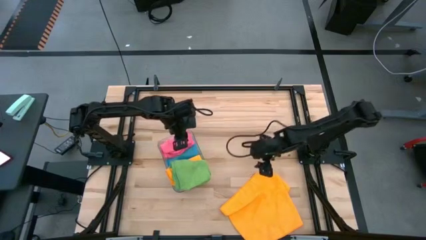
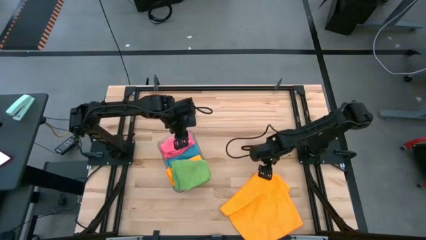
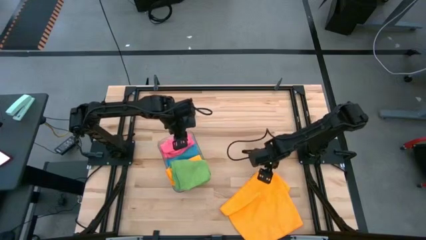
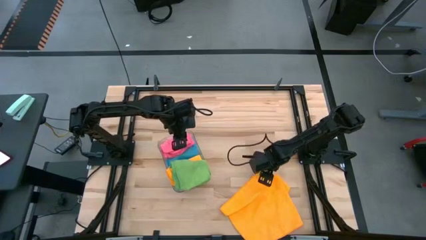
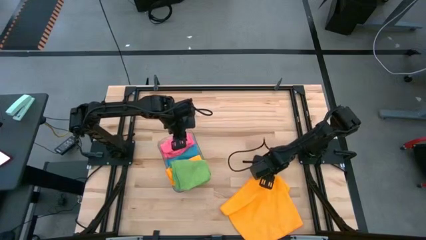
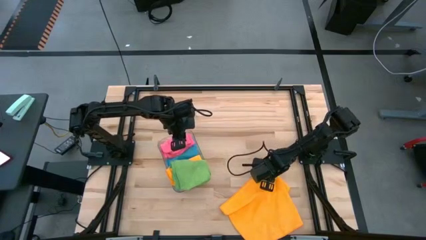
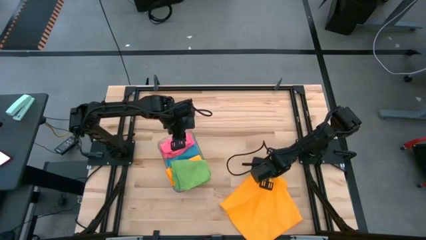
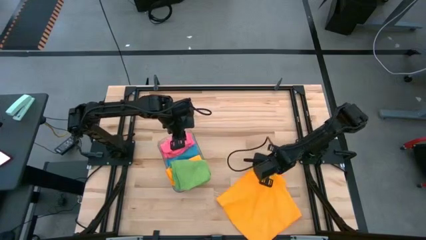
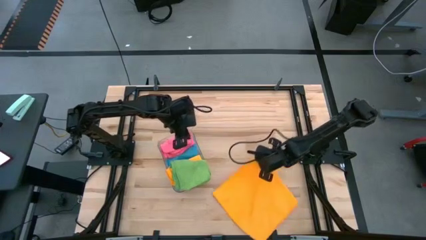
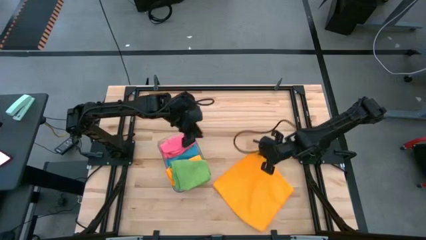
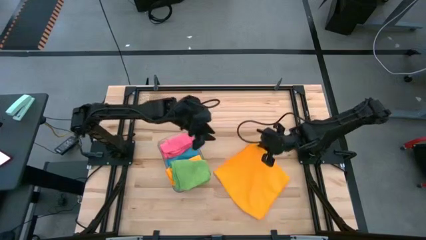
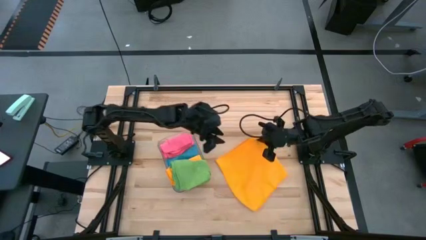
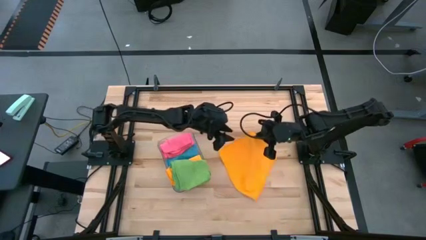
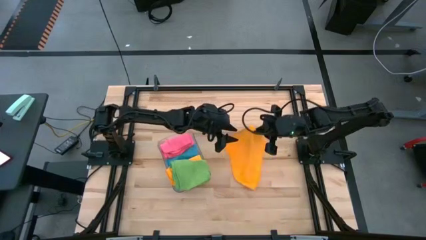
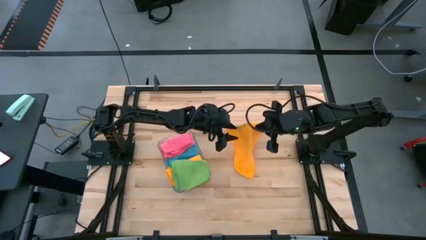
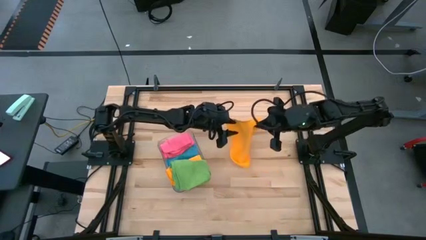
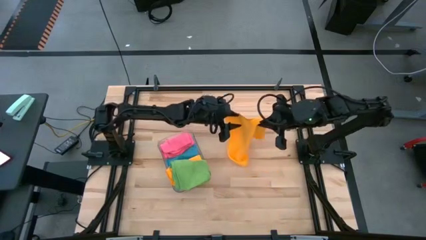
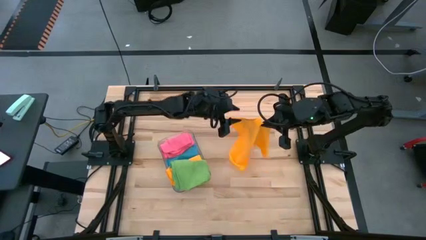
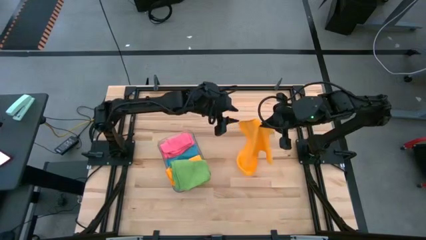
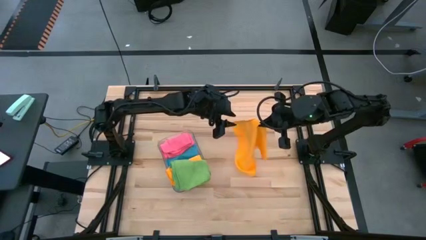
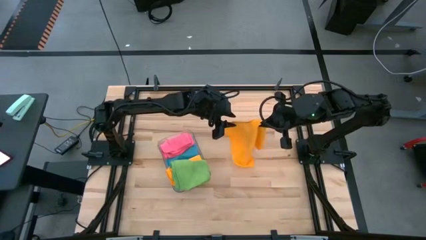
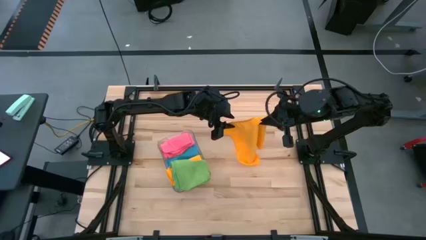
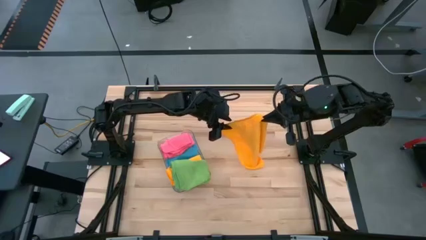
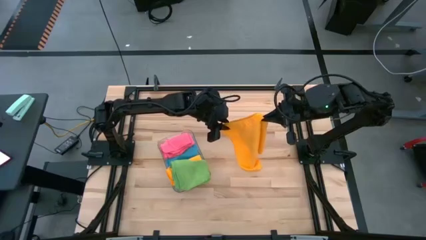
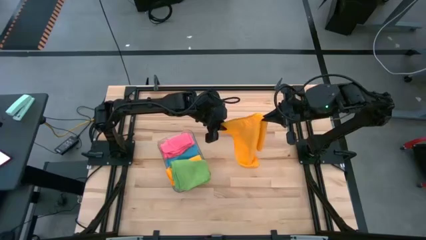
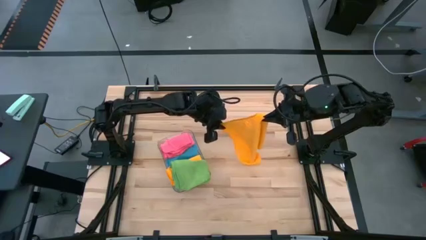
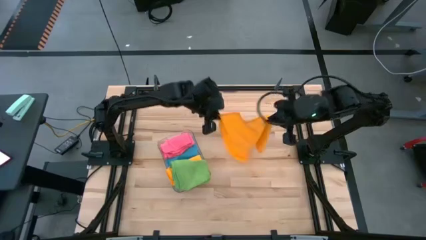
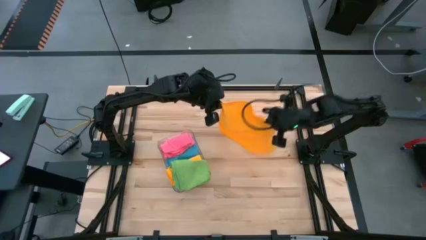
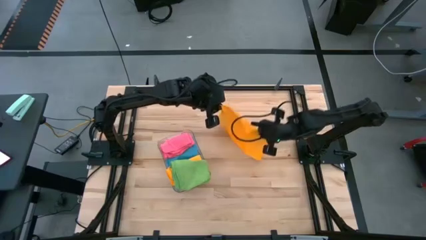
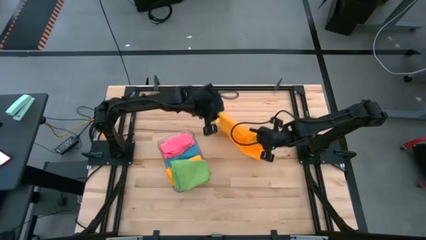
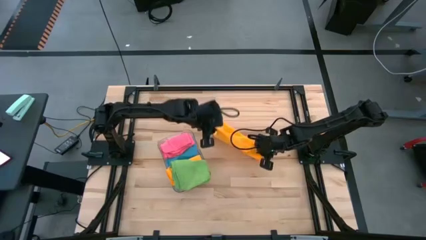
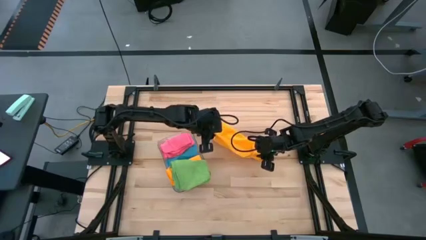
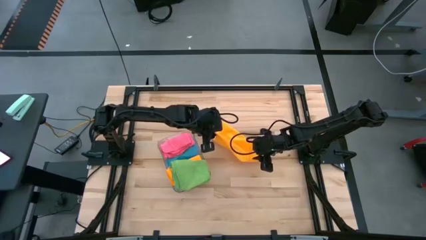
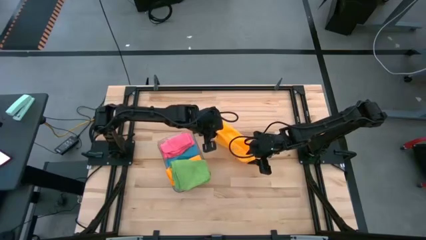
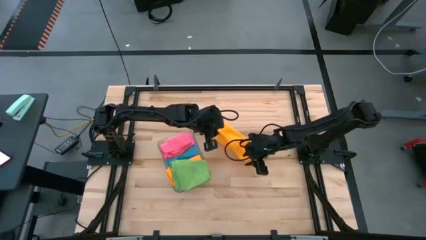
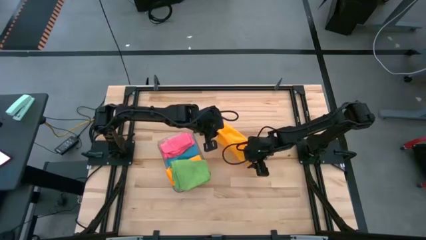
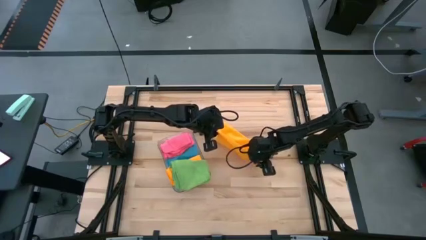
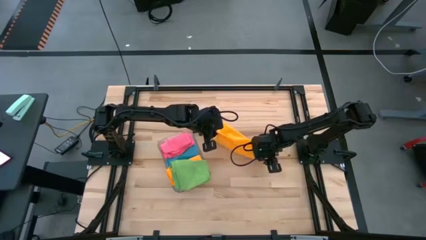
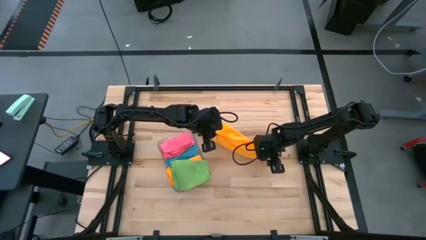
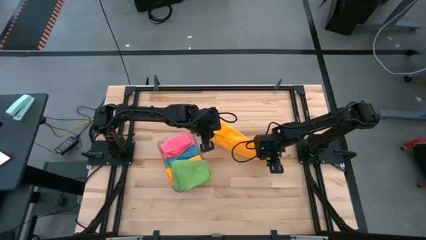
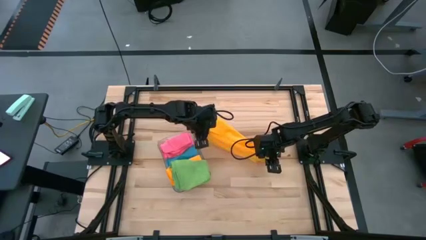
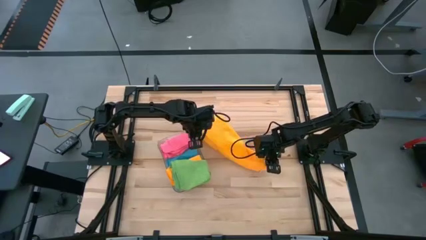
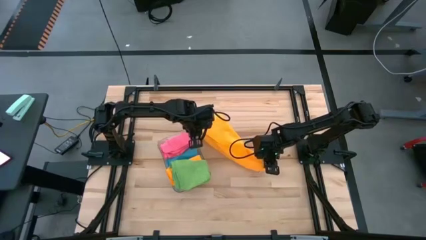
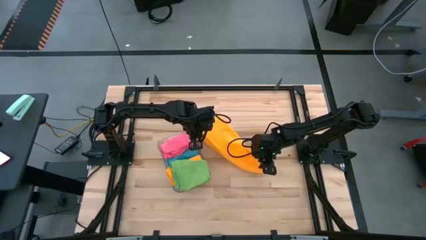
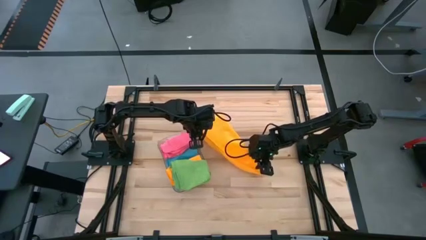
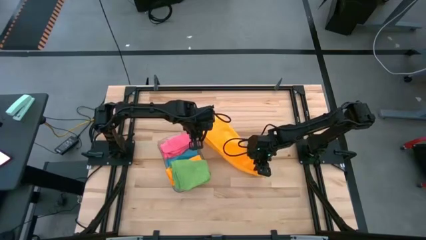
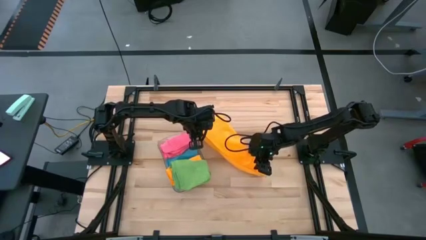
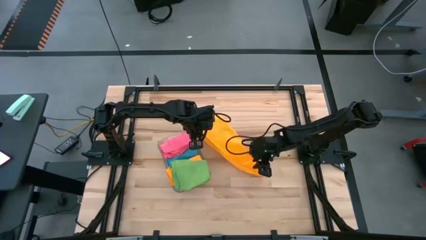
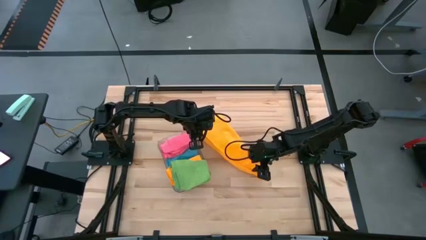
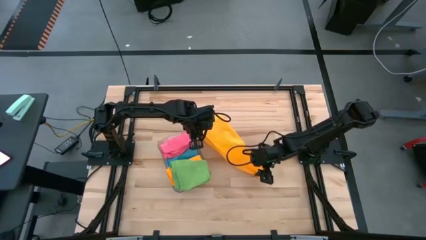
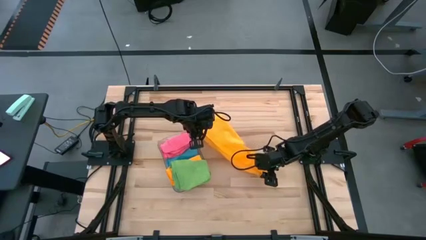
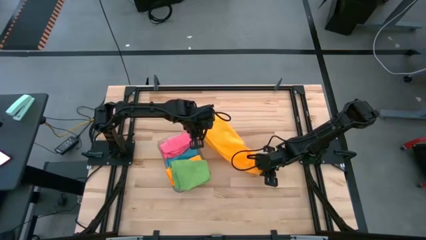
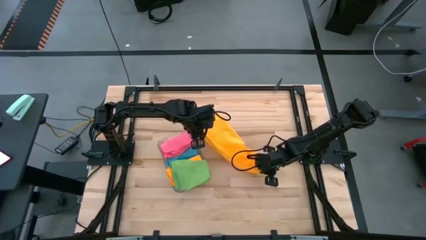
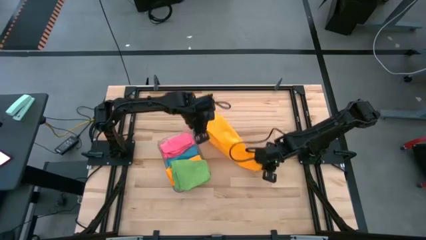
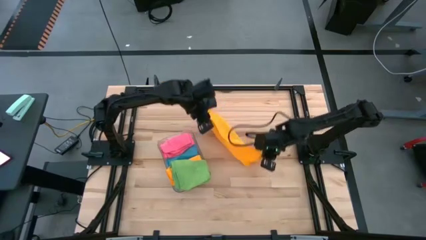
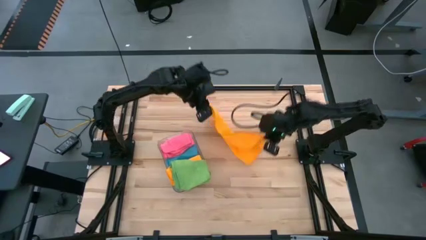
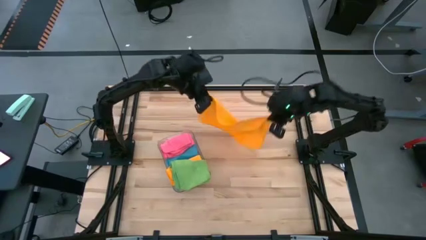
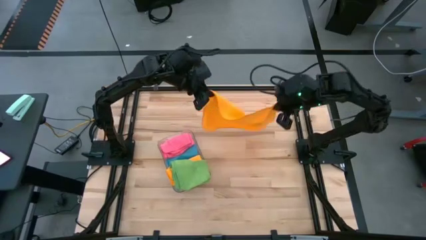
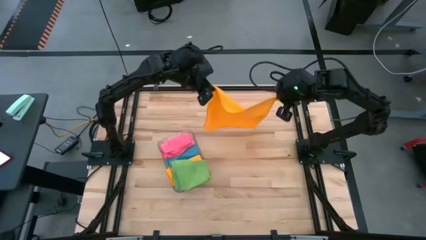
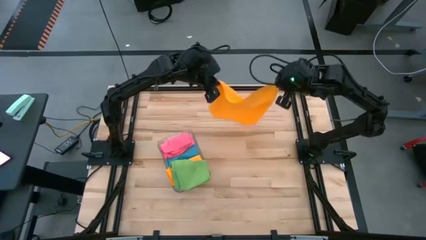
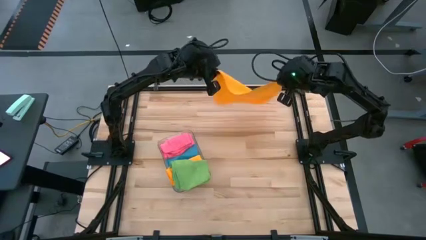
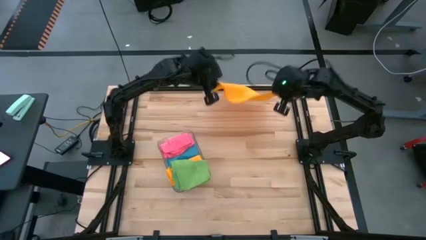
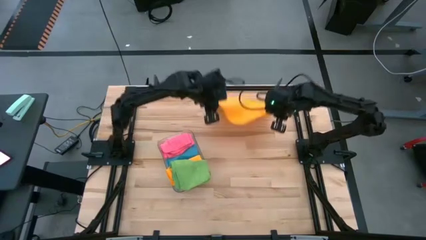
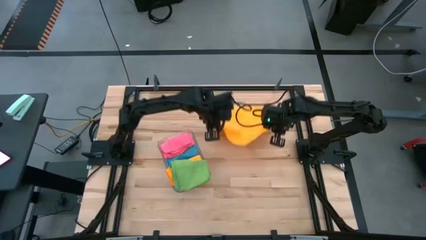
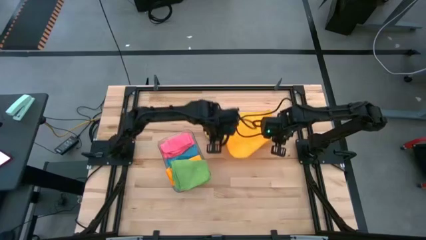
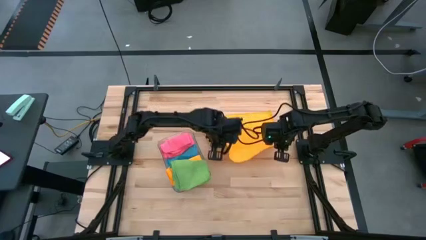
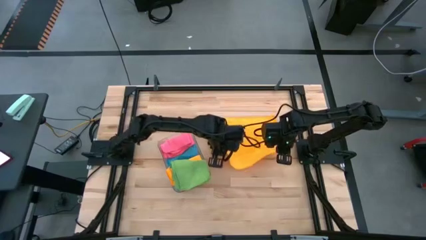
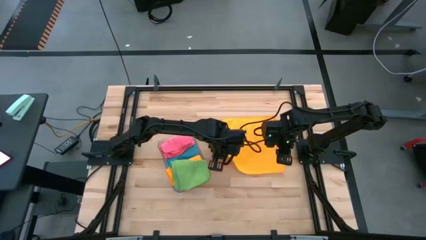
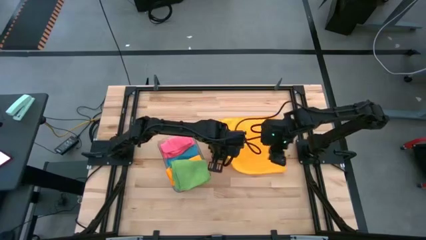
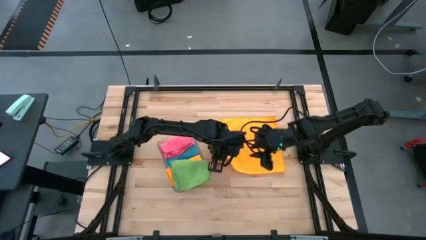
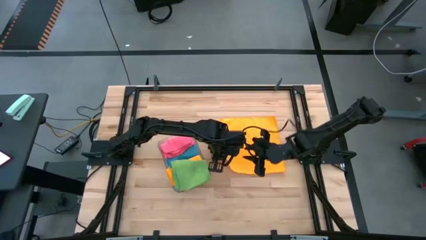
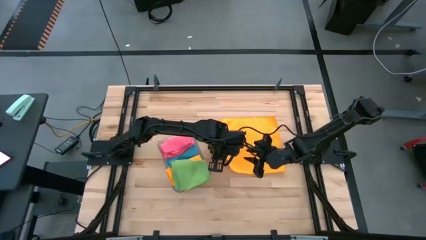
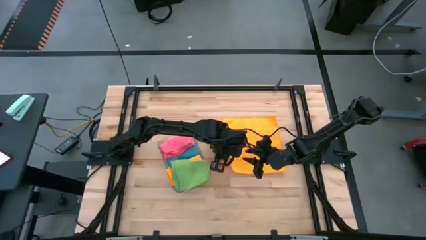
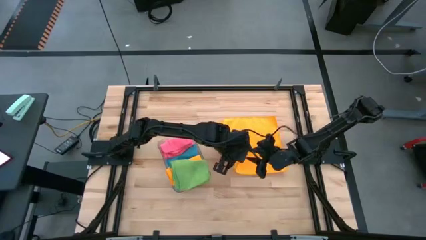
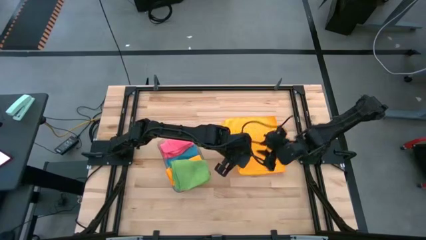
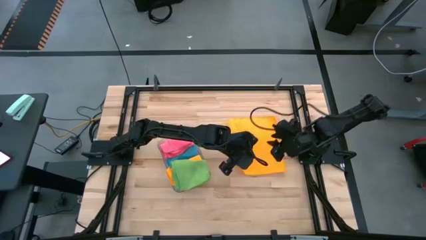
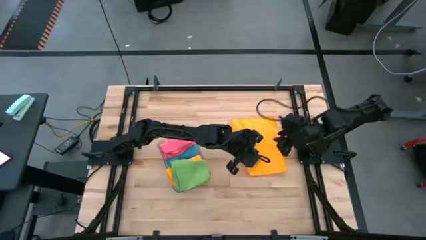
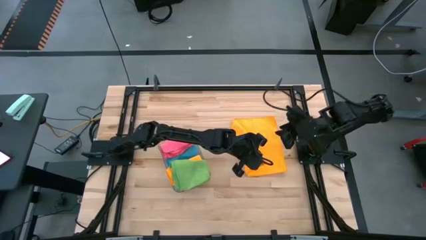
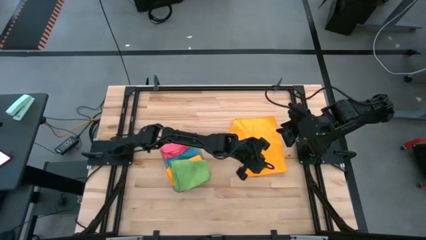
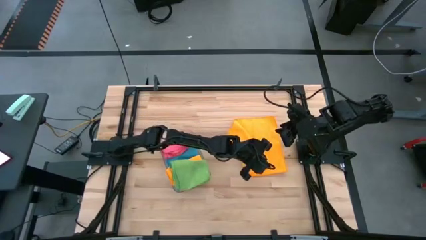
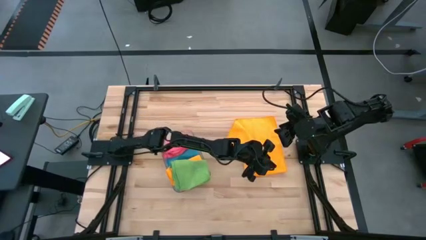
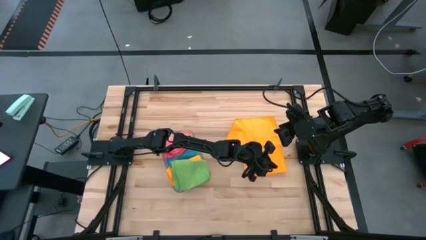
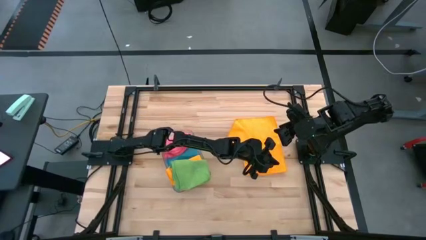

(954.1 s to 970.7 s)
Task: Fold microfiber towels
Fold the yellow towel
